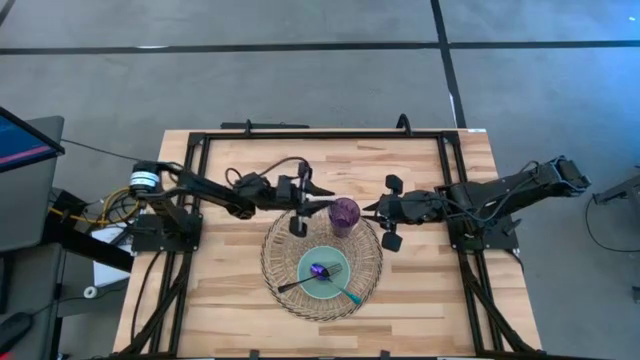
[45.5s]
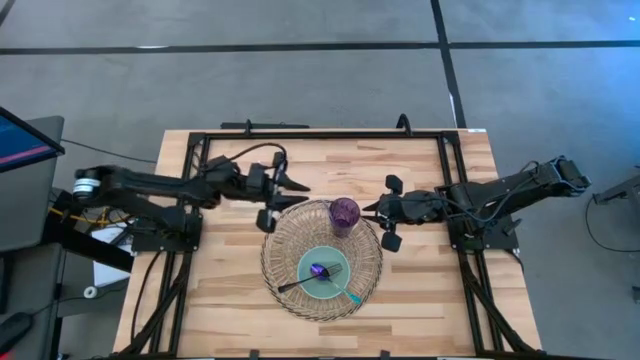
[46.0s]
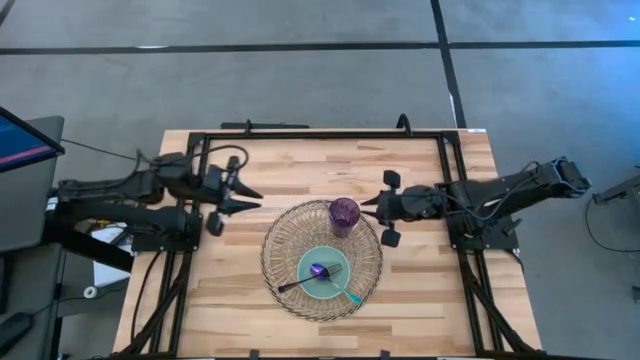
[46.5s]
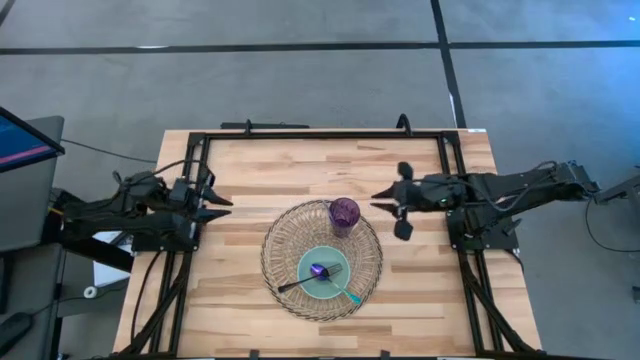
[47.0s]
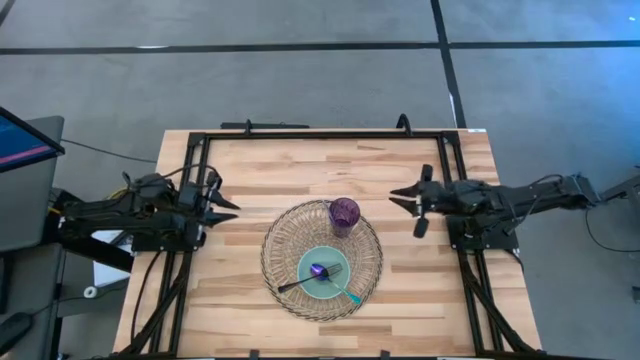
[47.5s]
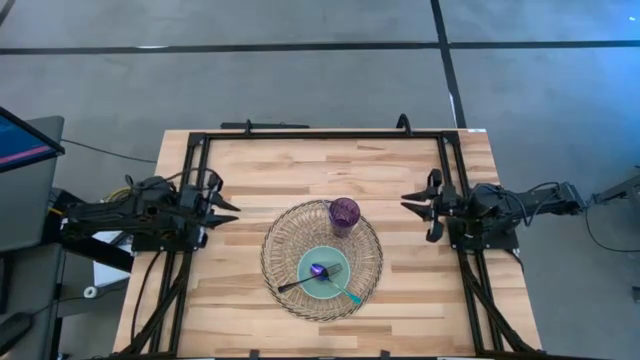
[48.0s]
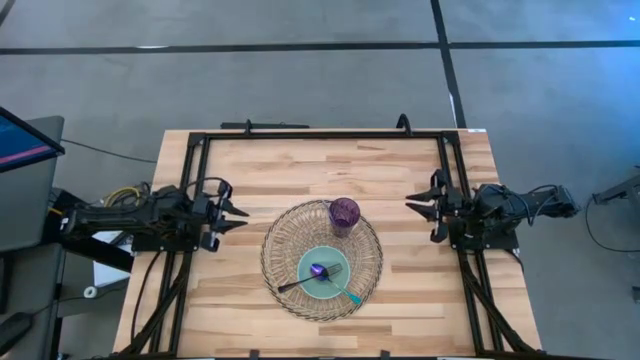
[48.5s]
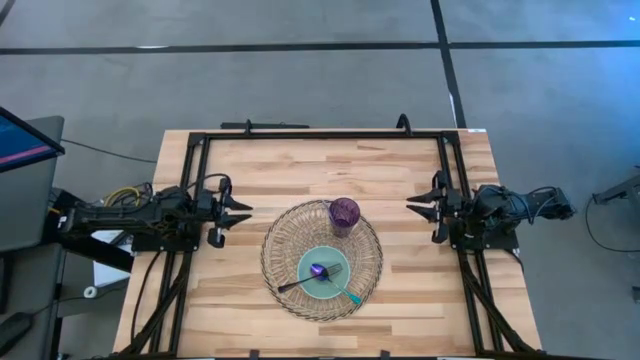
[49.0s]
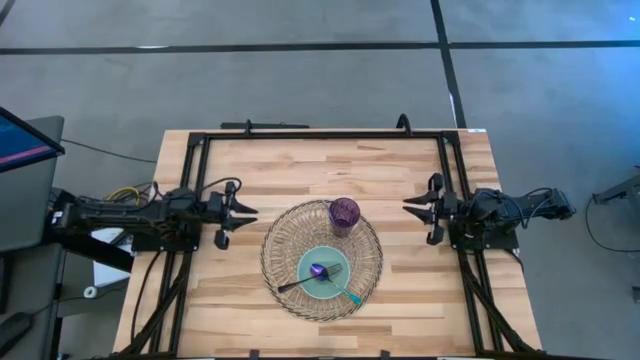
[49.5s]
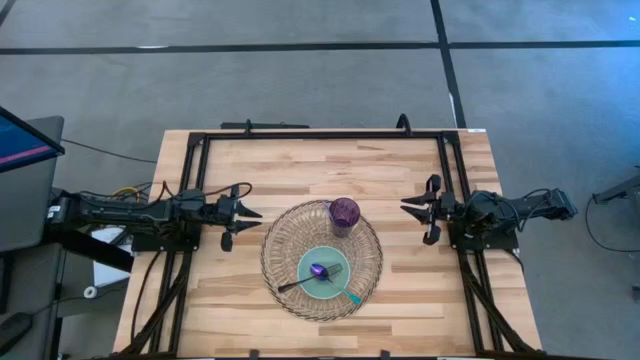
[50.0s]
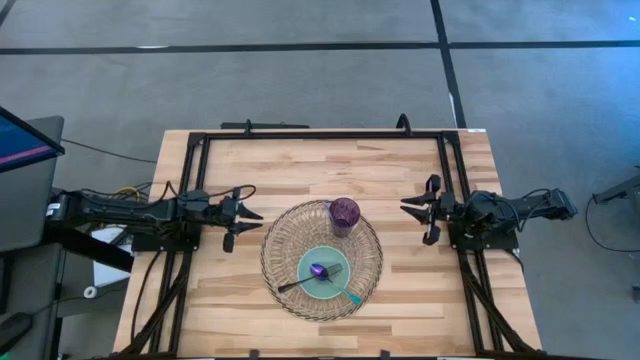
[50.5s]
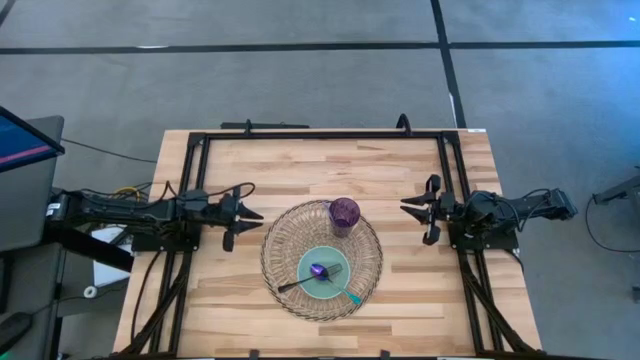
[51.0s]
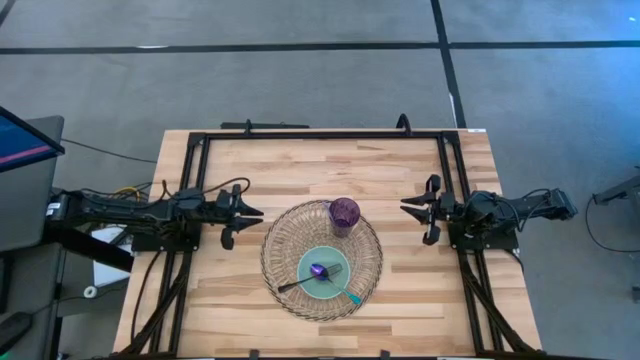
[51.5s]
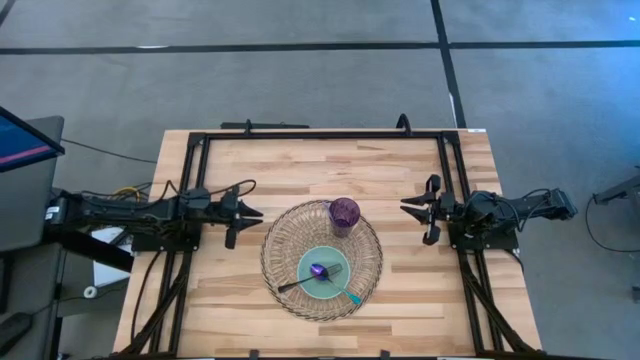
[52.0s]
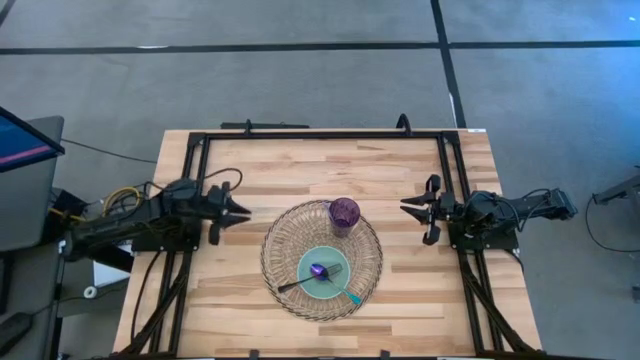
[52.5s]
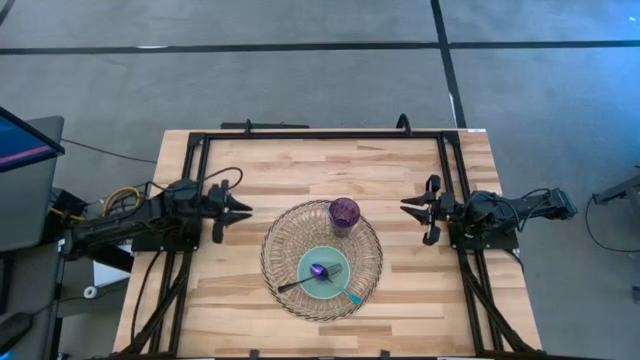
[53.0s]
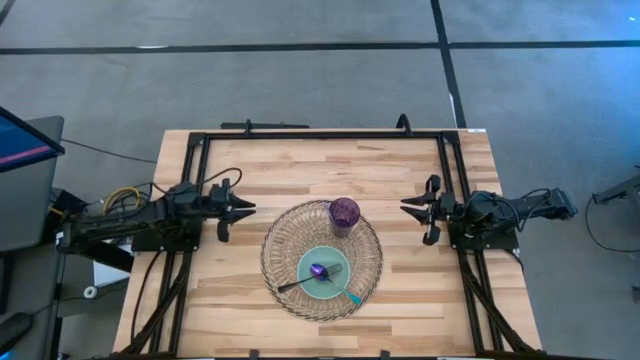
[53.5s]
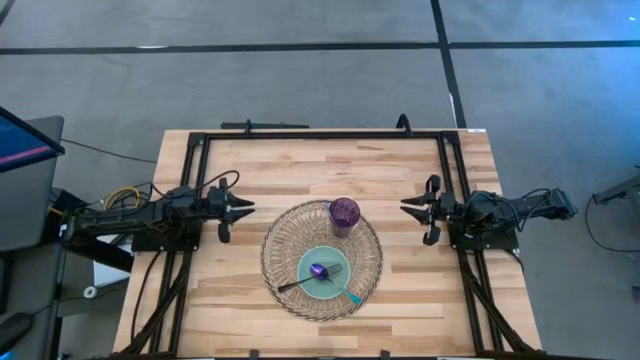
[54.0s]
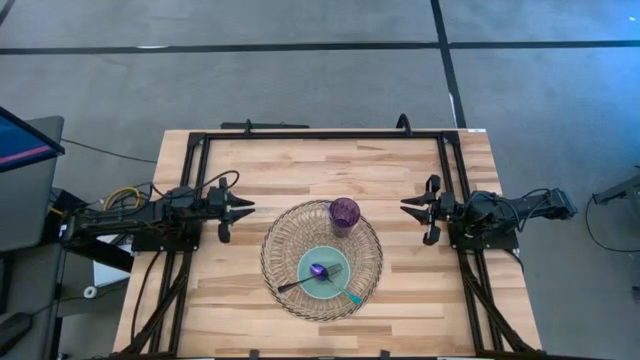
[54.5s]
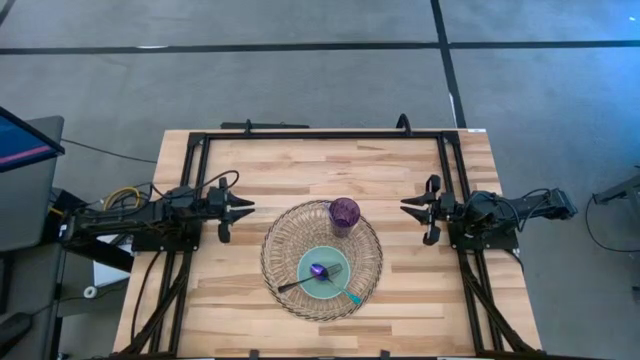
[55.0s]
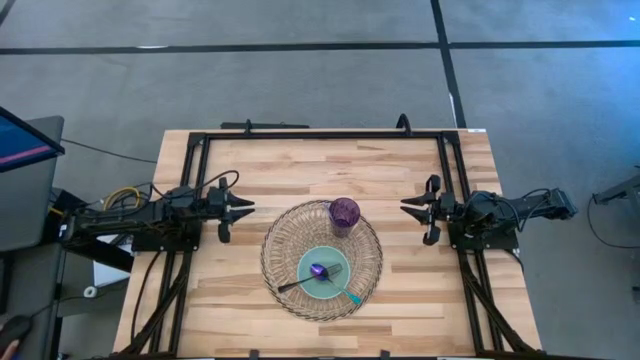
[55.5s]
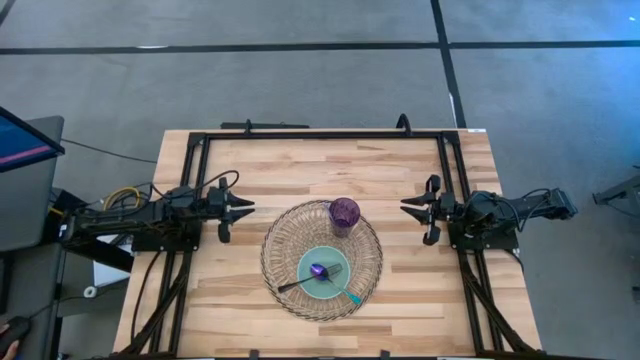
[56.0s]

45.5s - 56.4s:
Task: Pick & Place Utensil
Return to Home Position

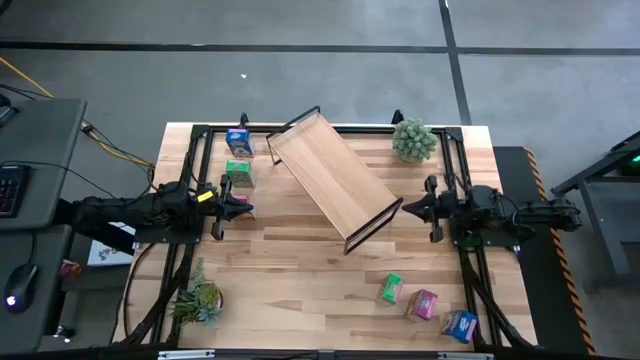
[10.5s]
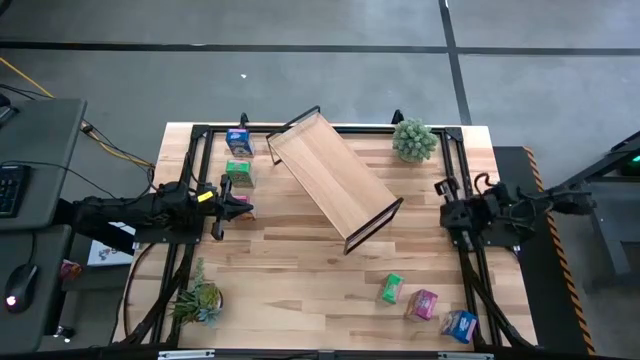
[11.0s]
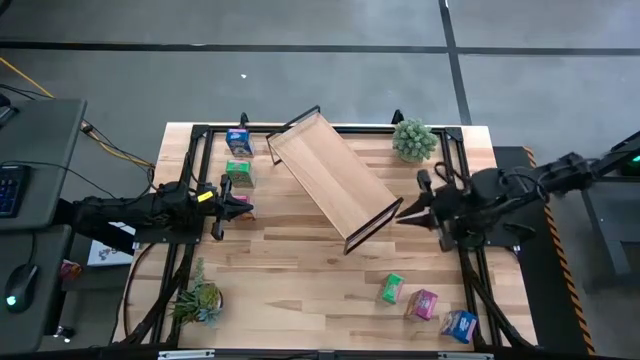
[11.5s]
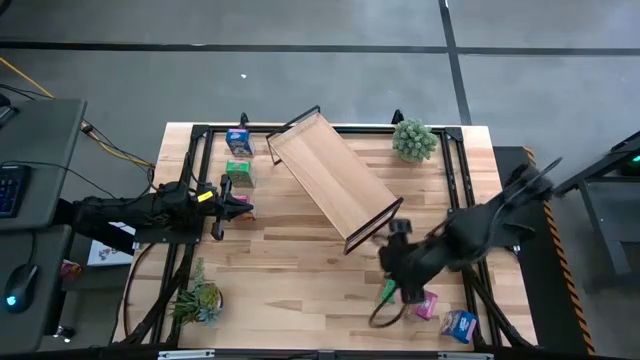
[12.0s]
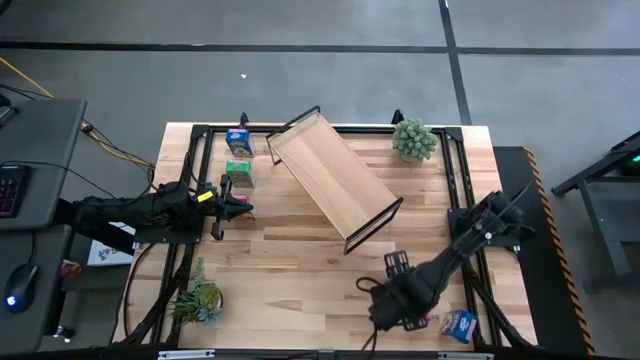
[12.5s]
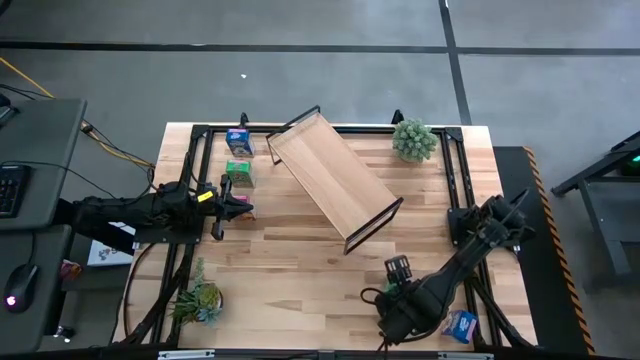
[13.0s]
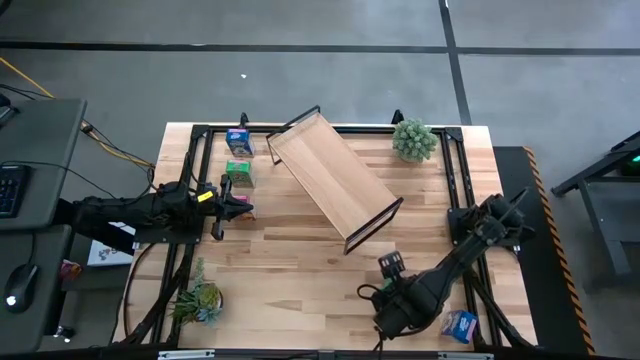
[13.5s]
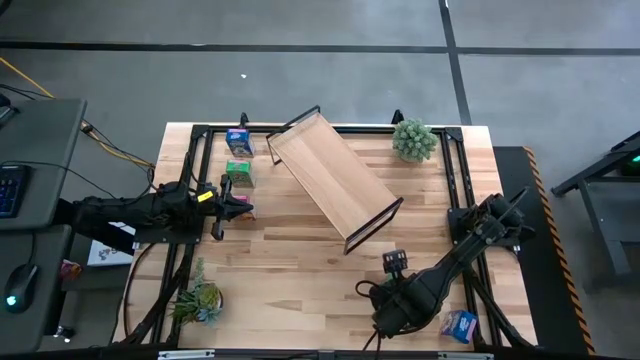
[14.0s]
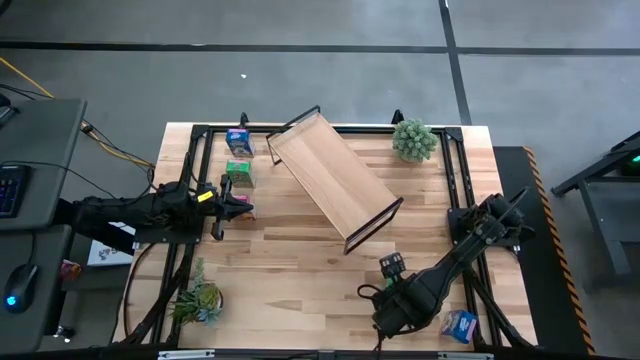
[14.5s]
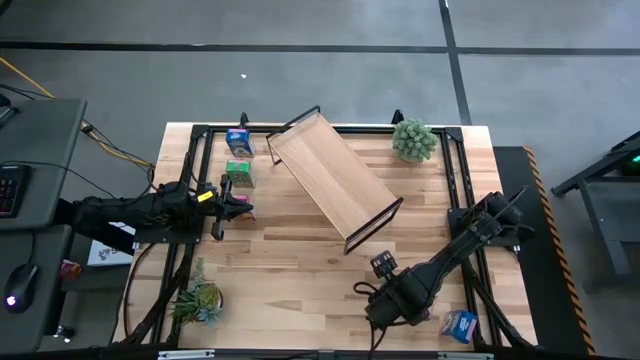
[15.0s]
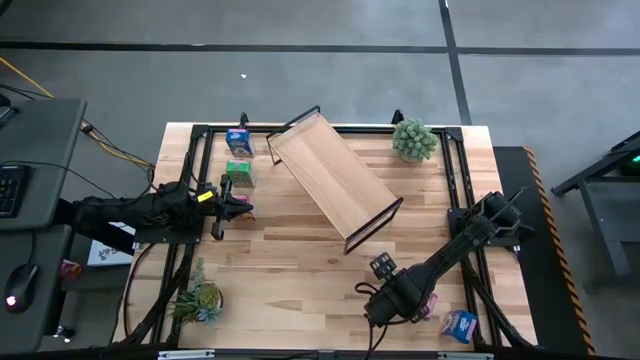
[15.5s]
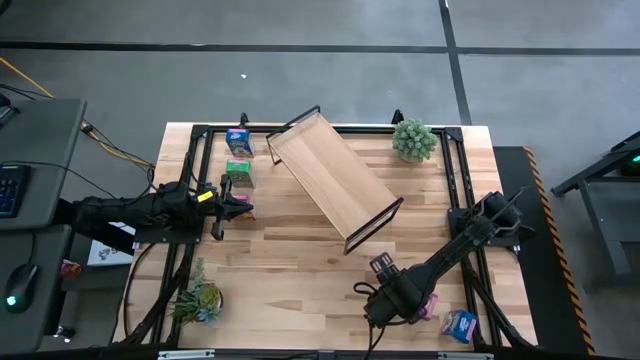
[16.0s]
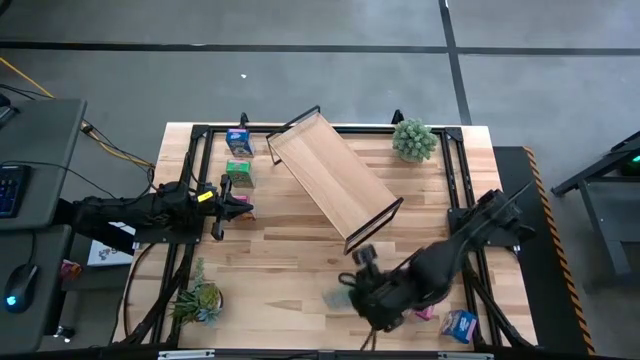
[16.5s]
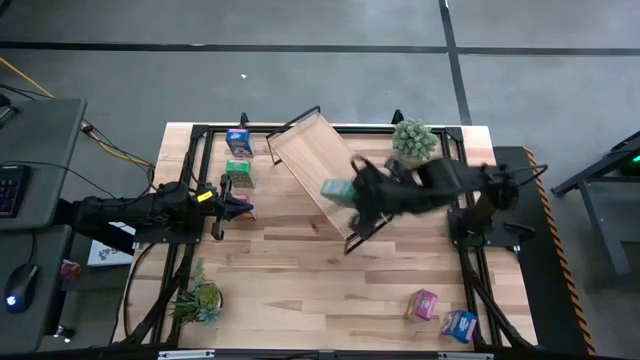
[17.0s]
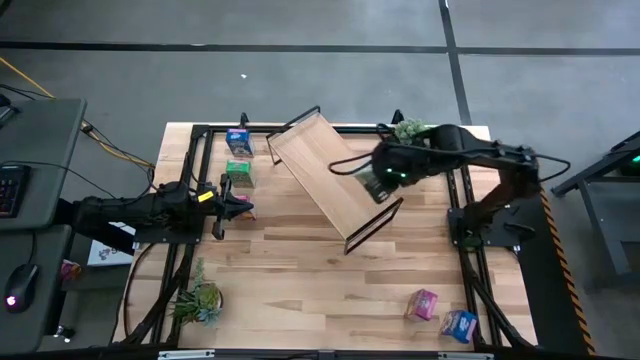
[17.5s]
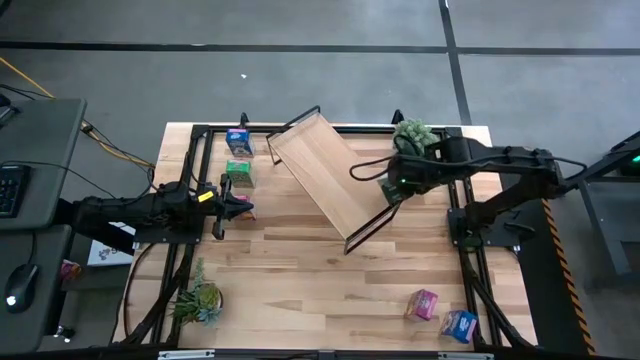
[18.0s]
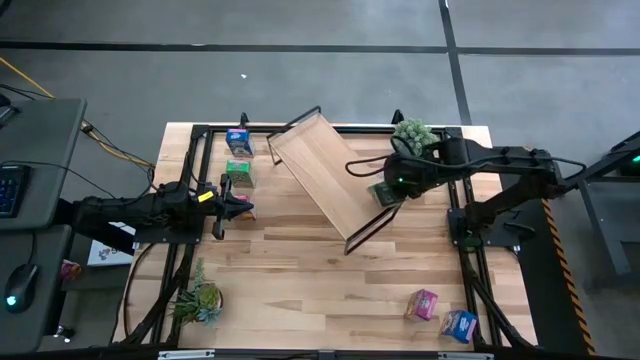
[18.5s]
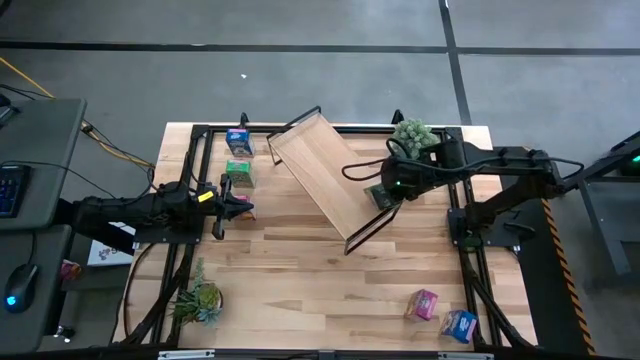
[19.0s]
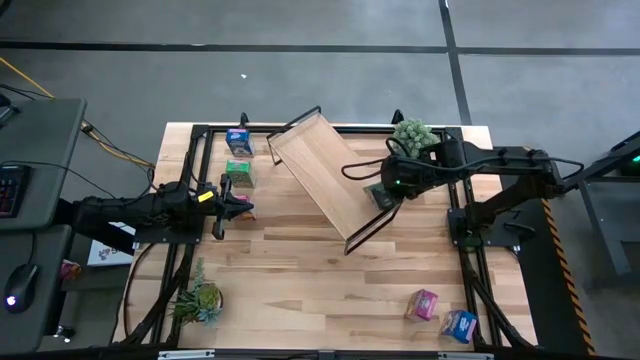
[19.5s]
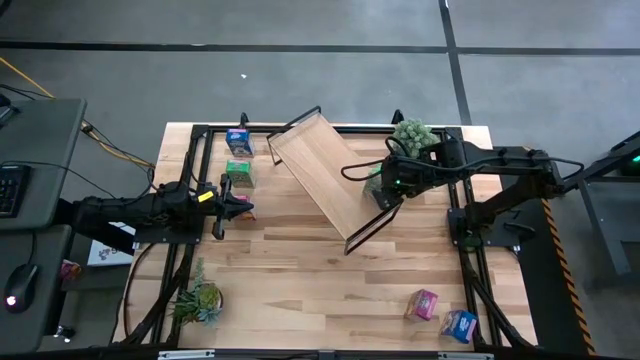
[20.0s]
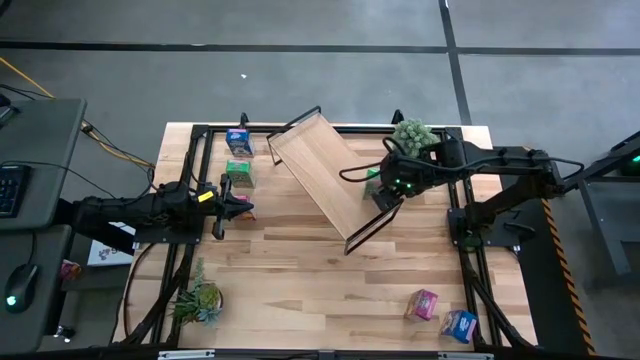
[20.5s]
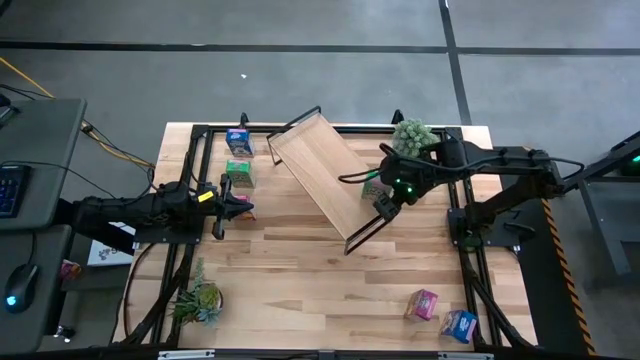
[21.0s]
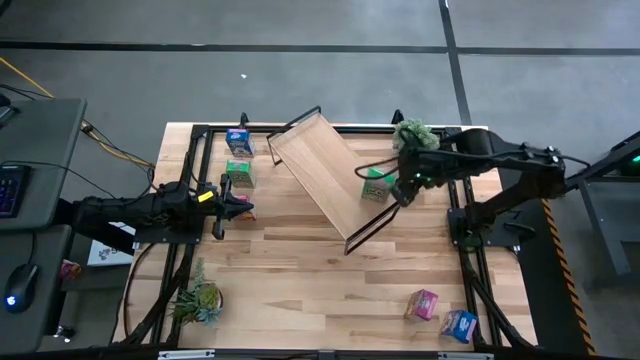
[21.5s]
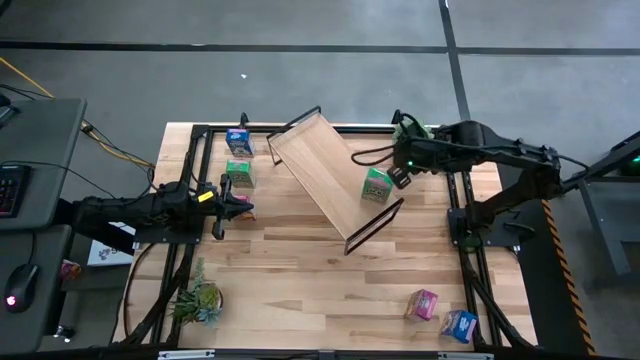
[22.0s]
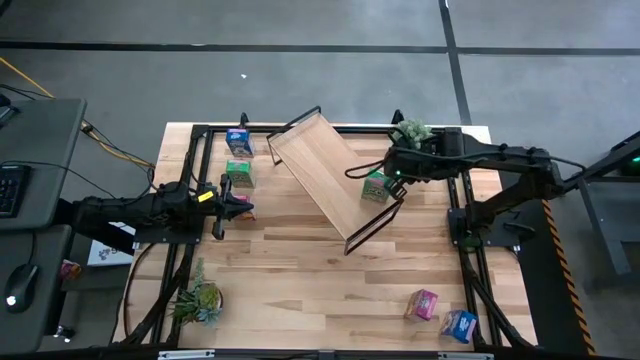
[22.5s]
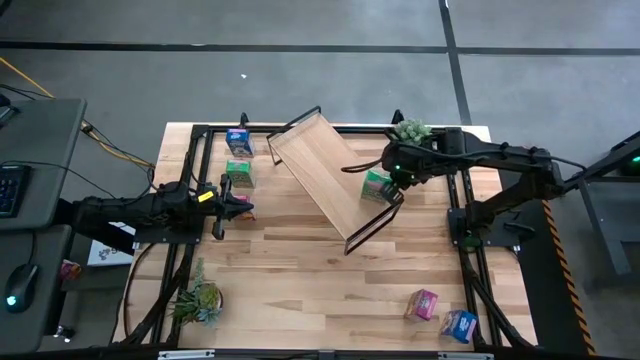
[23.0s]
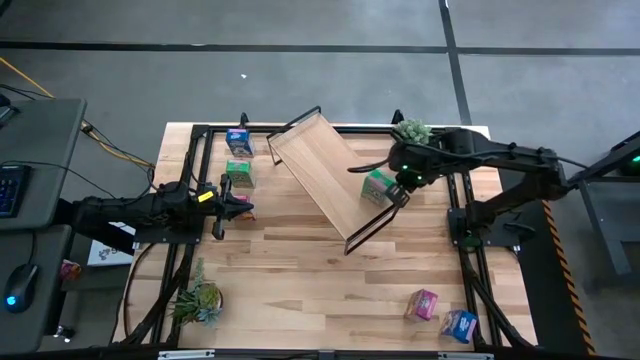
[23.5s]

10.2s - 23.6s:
Task: Stack cereal on shelf
Put the bottom green cereal box on the shelf
